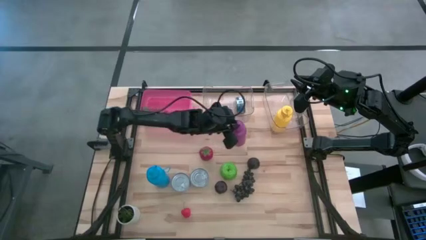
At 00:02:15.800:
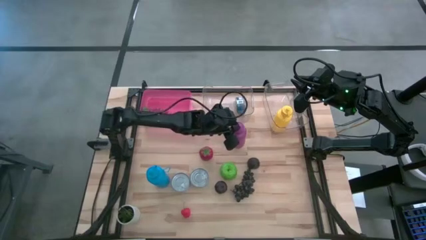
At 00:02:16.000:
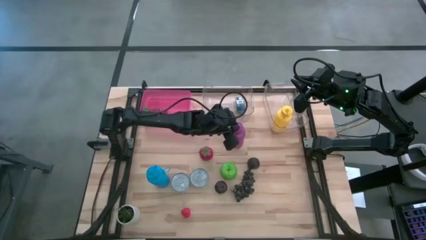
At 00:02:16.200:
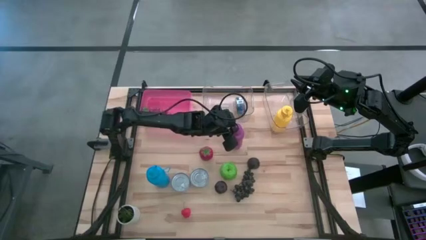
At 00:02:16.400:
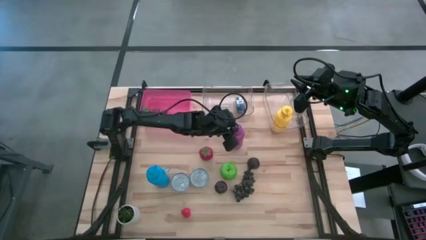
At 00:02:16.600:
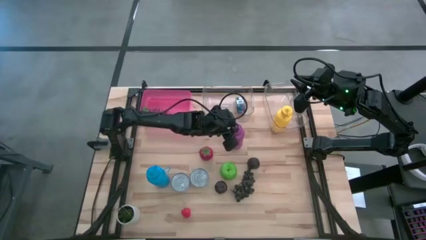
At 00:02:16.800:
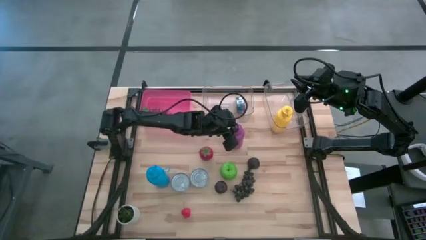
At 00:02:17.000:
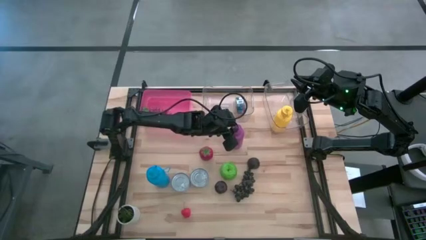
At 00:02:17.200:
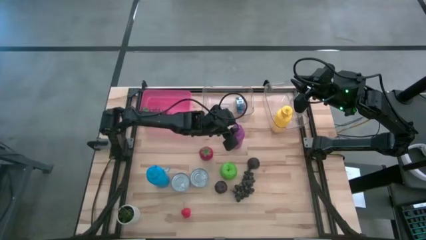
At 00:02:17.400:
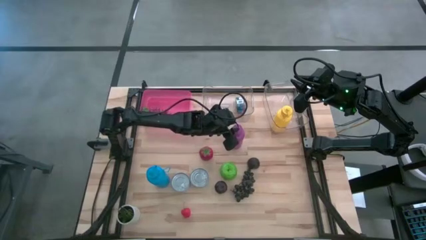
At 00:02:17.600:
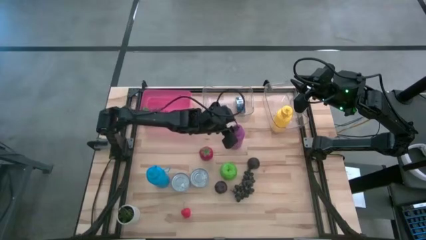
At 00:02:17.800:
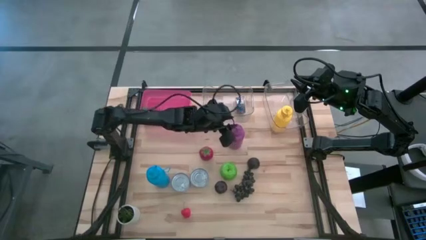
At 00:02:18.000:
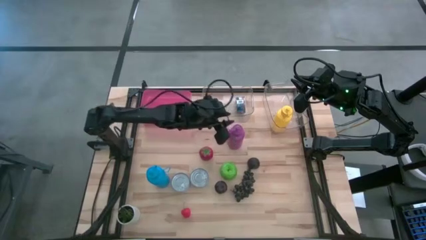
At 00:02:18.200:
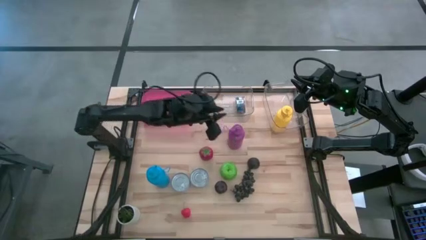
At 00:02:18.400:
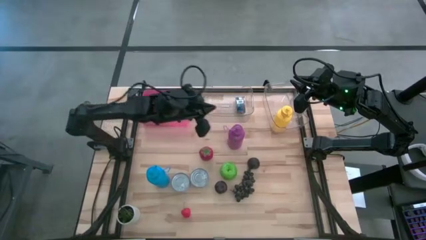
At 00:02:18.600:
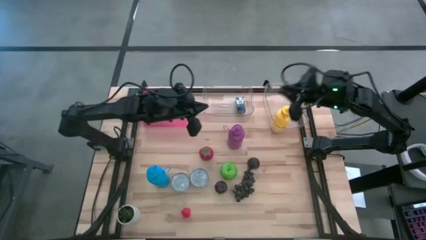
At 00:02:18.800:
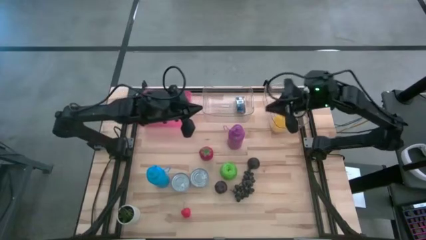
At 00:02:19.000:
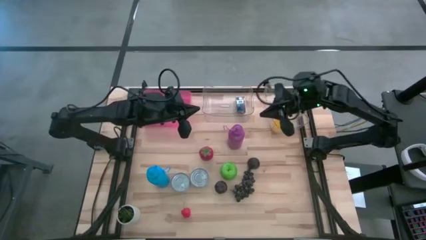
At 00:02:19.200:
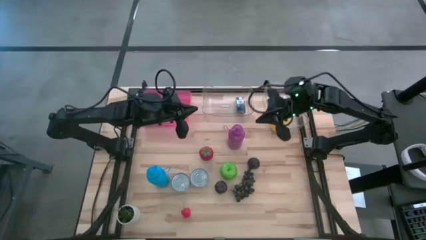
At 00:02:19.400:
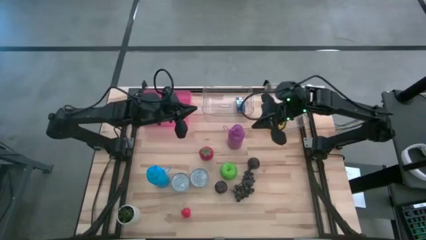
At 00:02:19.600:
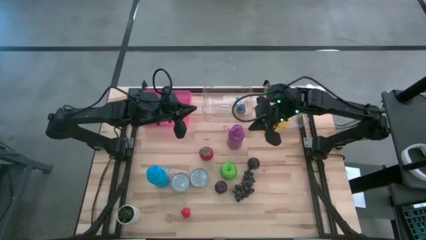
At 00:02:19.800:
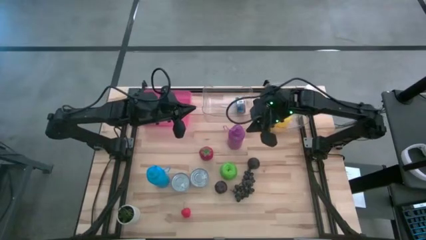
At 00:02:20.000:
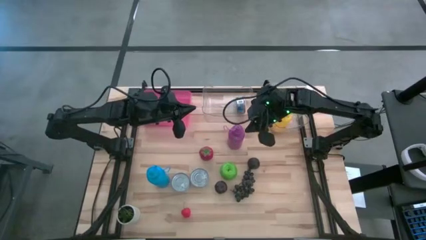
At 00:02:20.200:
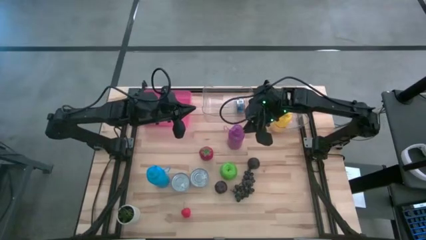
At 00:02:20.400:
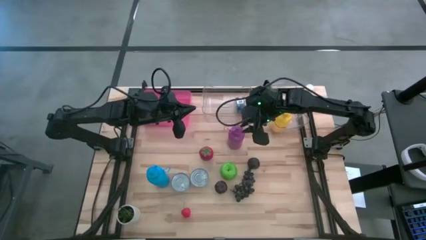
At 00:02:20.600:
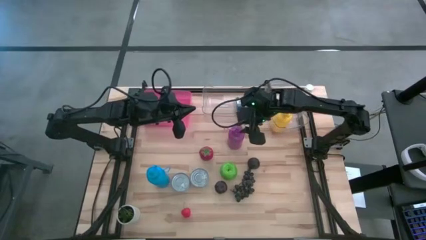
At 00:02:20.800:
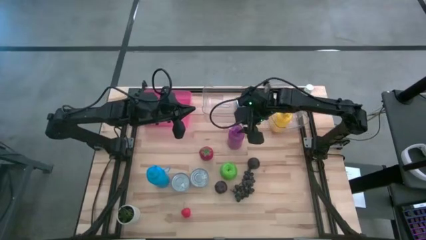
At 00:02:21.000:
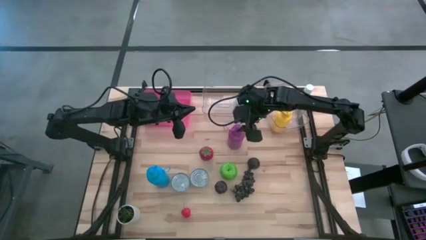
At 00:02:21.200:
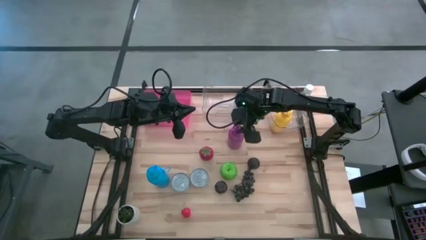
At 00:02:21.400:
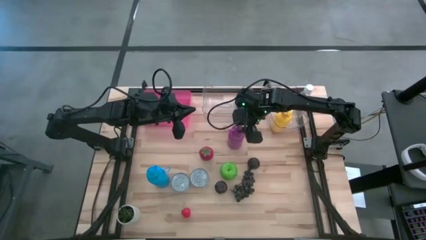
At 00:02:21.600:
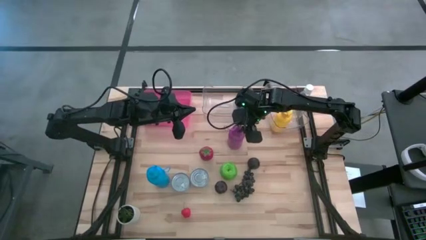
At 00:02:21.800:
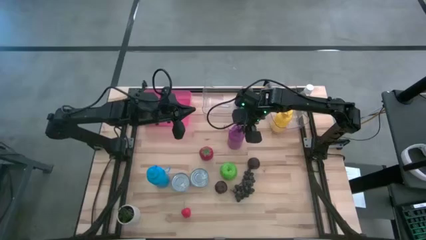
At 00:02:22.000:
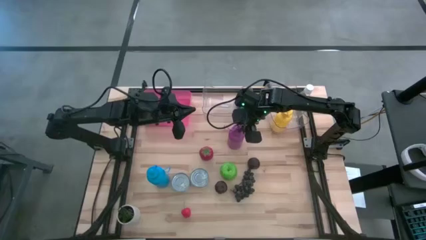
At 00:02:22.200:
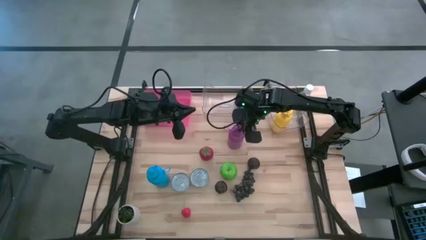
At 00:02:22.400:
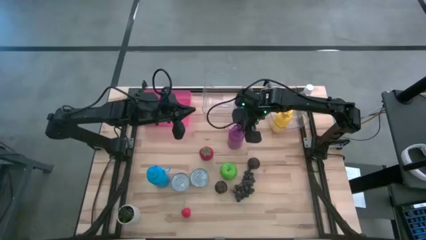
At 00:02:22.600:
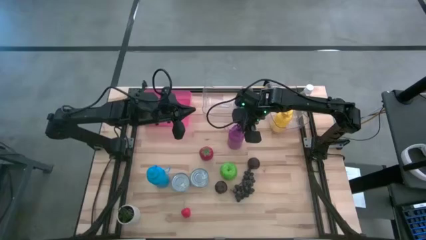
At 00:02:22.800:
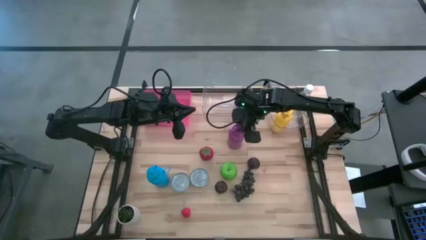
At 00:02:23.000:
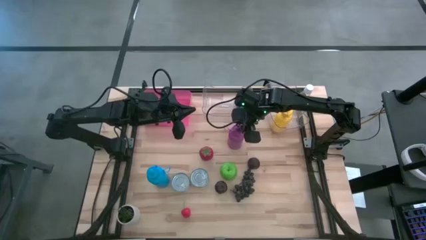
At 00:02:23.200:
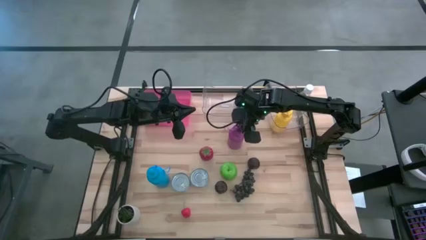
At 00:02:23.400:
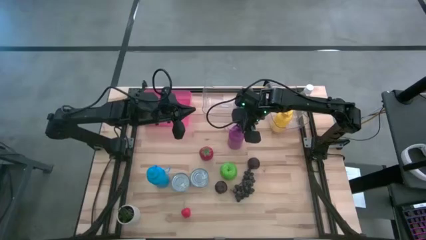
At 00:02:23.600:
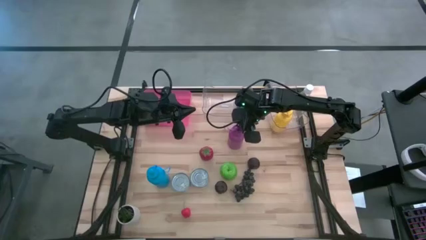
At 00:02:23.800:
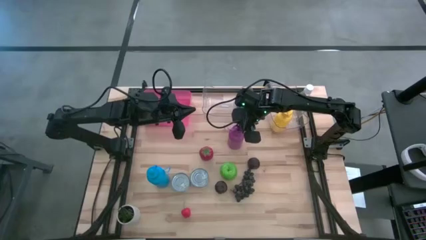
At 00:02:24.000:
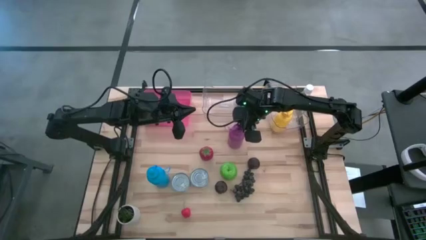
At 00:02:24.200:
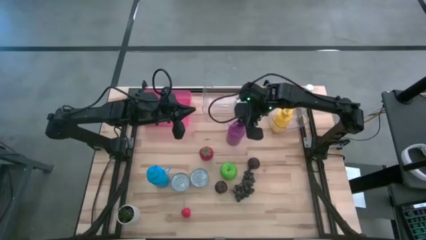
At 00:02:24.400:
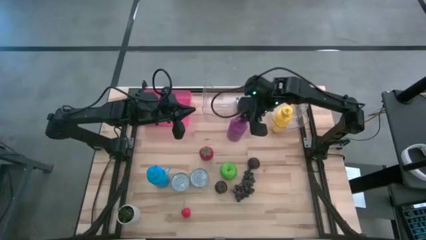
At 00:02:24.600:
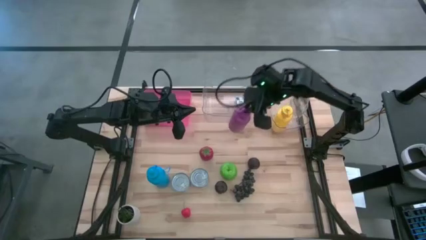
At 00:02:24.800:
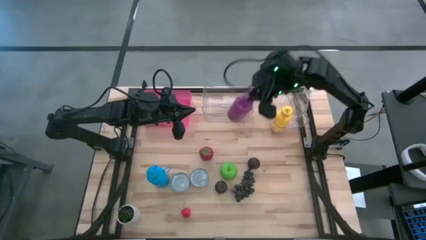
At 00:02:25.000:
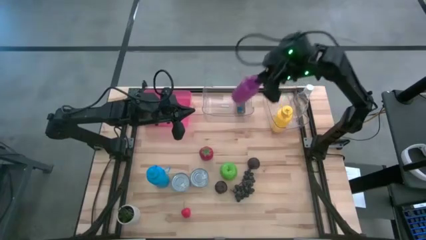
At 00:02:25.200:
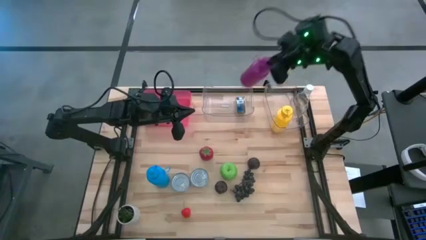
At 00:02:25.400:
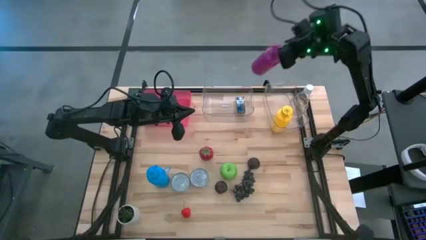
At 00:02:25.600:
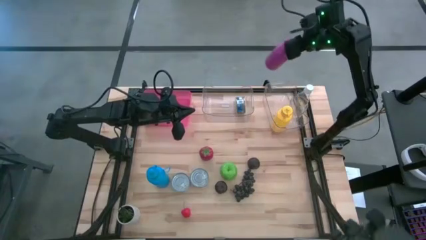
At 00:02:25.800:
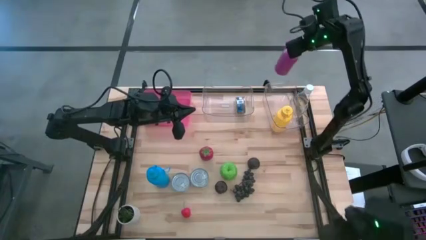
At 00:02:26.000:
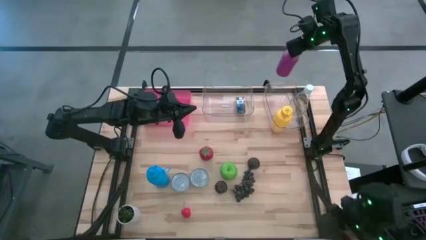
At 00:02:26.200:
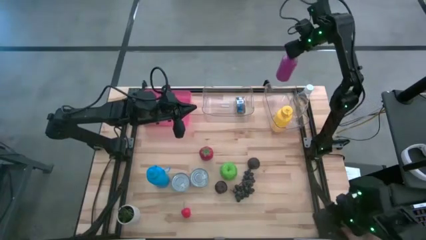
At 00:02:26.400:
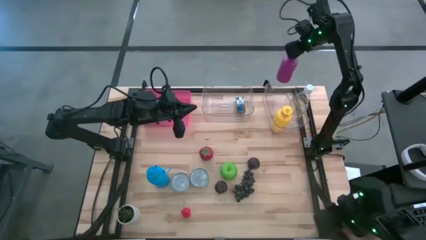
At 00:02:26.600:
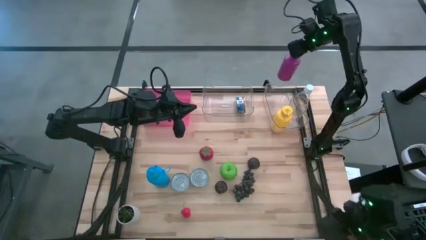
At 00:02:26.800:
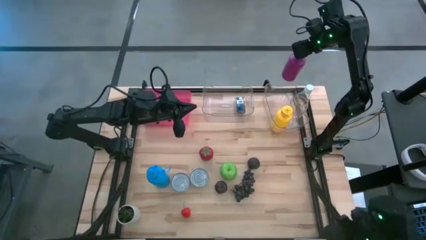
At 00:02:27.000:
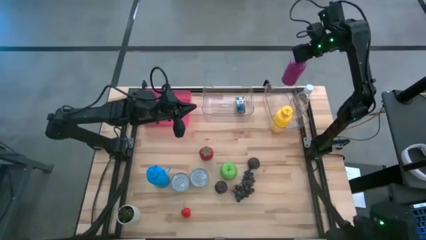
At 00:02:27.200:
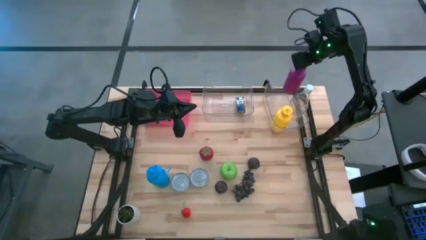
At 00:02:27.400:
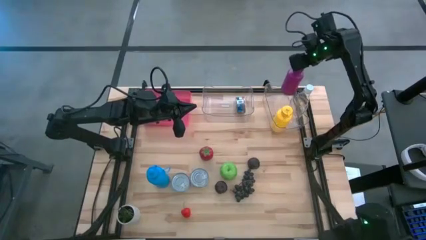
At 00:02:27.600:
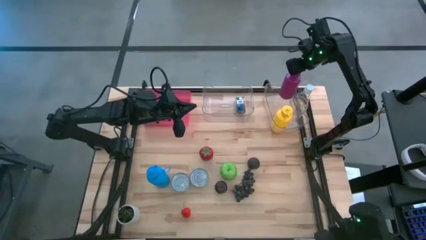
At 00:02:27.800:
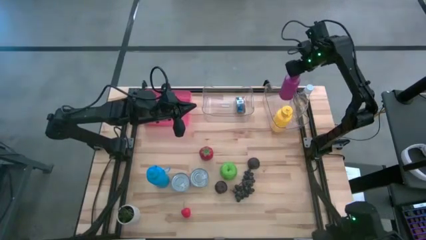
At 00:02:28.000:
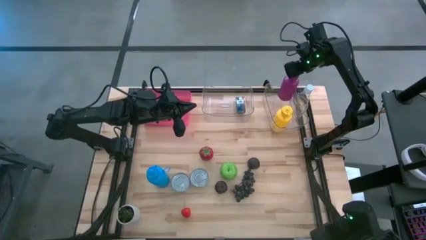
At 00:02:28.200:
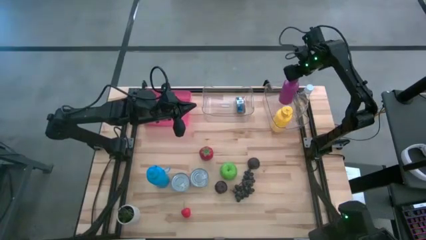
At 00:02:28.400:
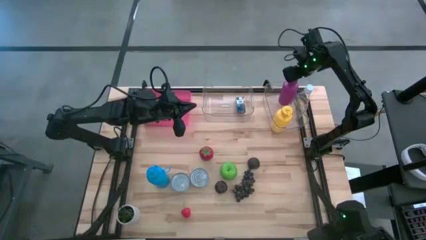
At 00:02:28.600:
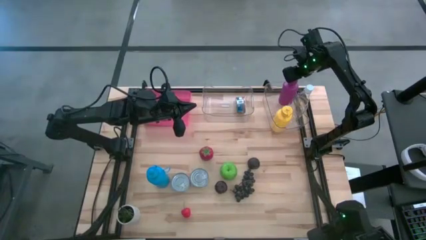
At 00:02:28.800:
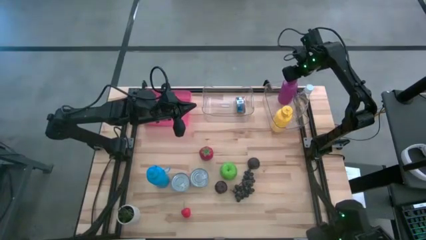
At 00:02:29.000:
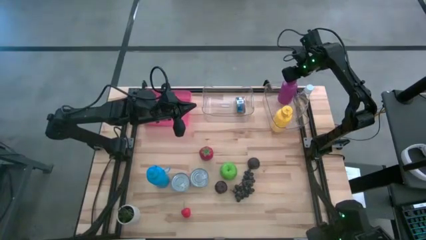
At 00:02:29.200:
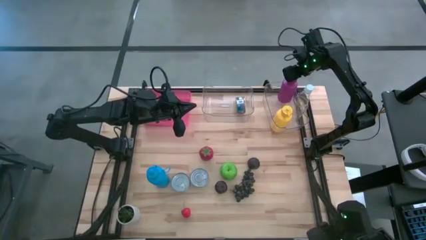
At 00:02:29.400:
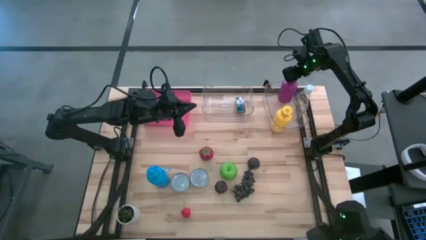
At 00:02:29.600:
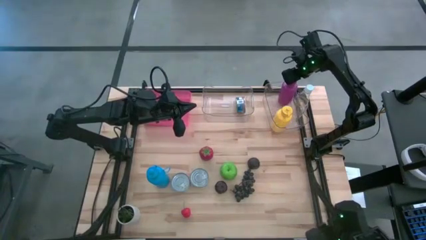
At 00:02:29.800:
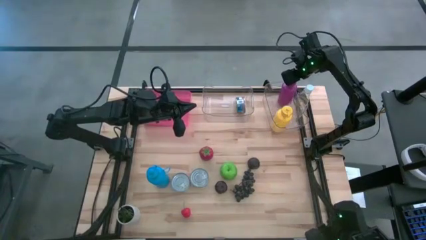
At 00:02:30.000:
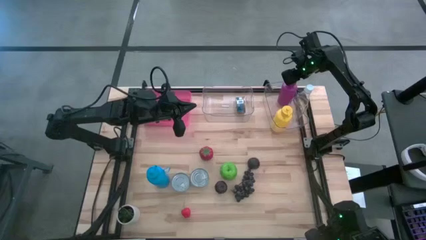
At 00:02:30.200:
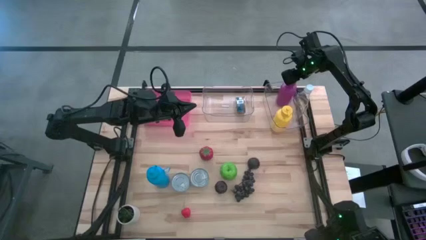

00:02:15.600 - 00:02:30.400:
Task: Pick & Place Food Item
Put the purple water bottle into the right transparent bin
